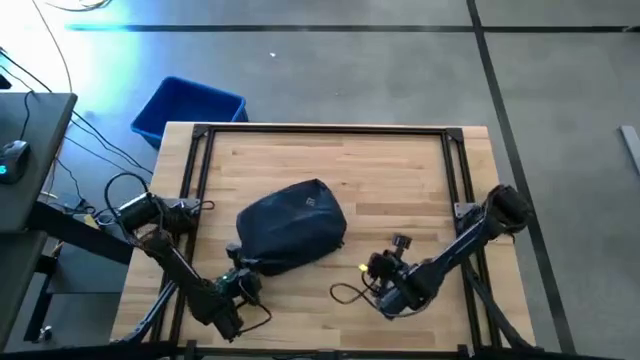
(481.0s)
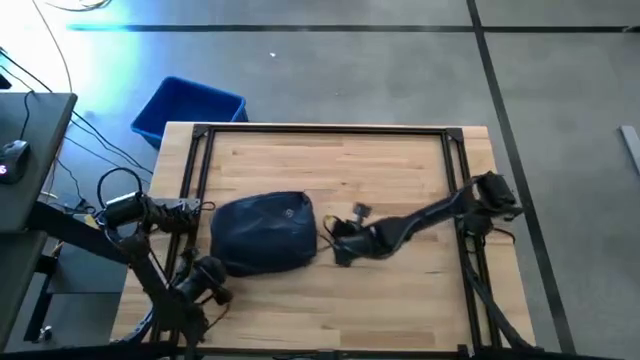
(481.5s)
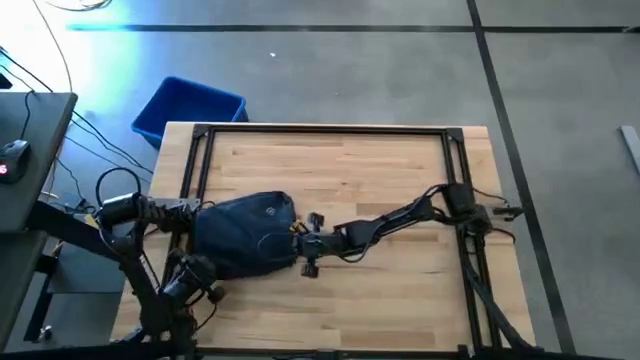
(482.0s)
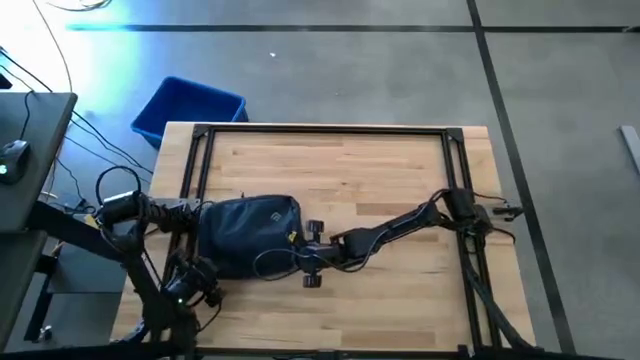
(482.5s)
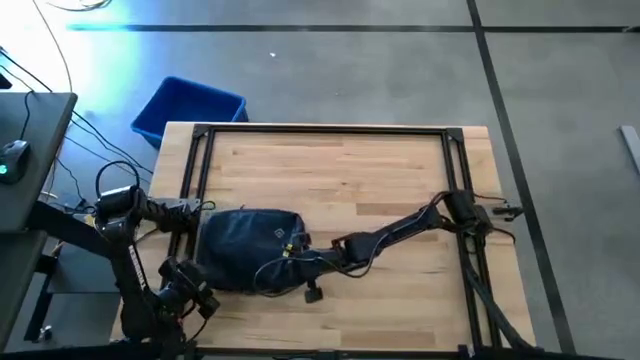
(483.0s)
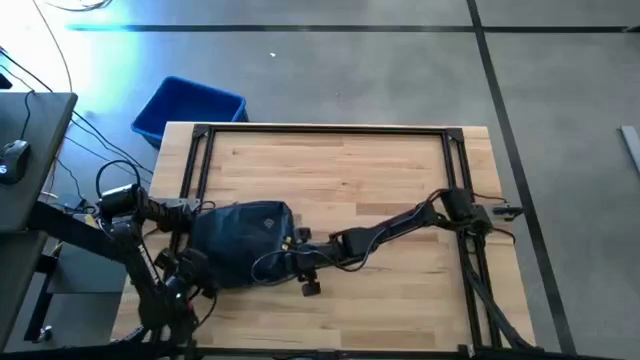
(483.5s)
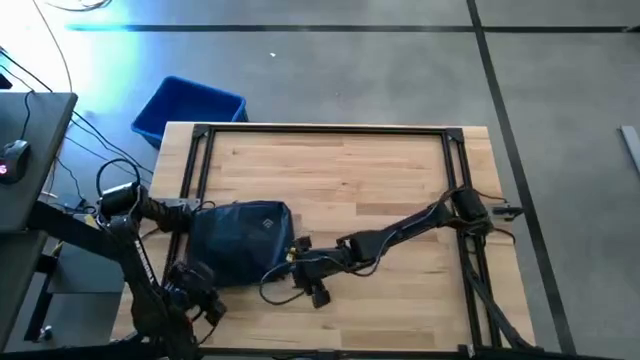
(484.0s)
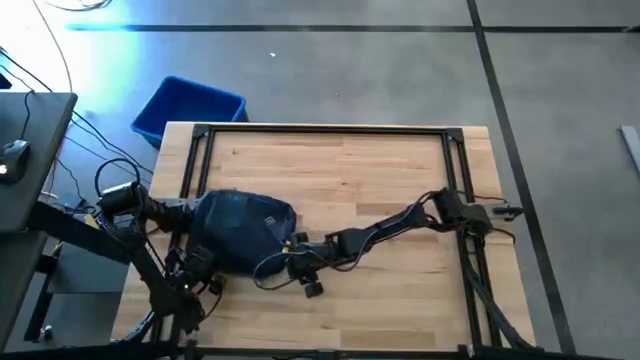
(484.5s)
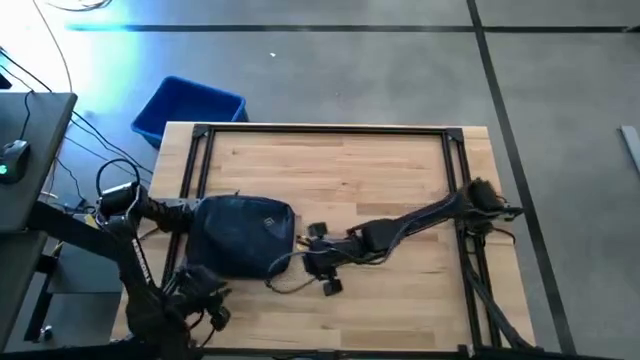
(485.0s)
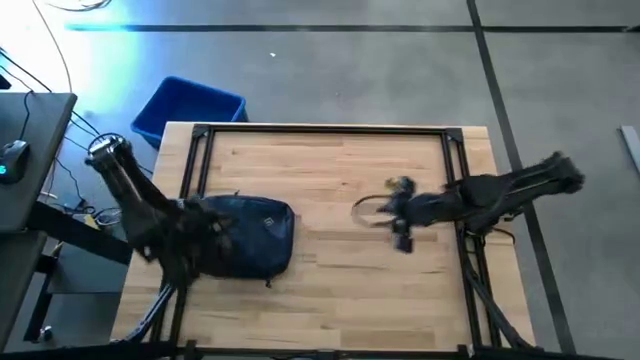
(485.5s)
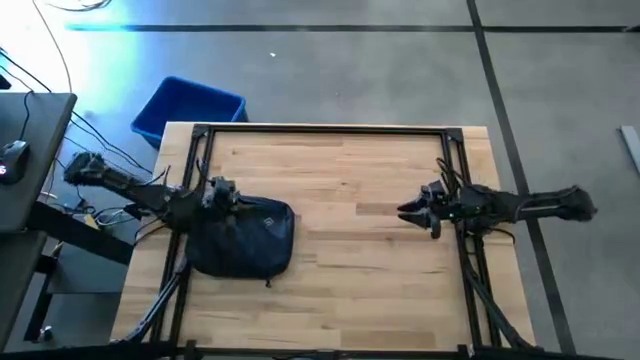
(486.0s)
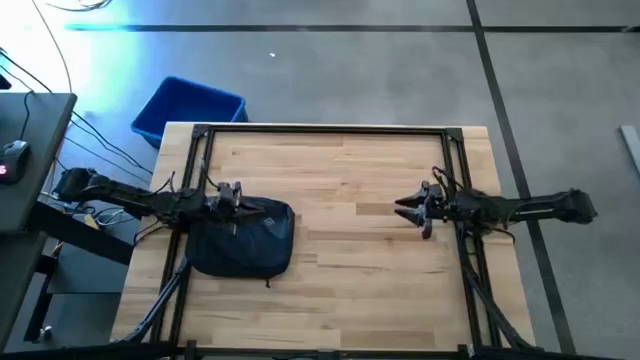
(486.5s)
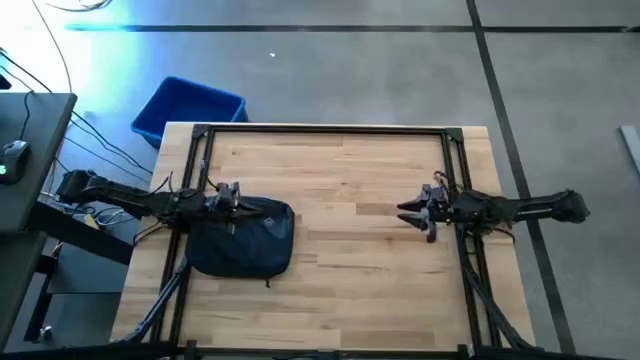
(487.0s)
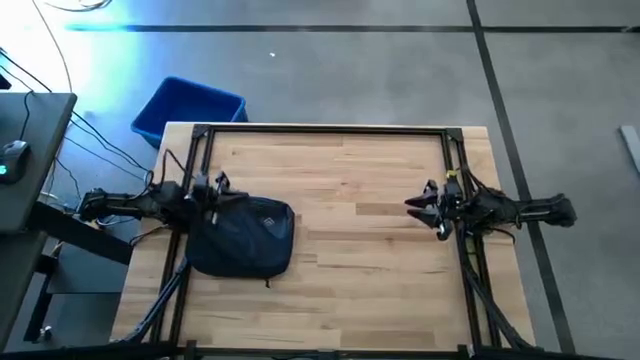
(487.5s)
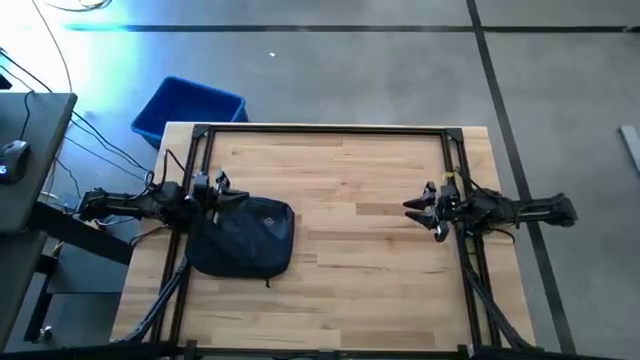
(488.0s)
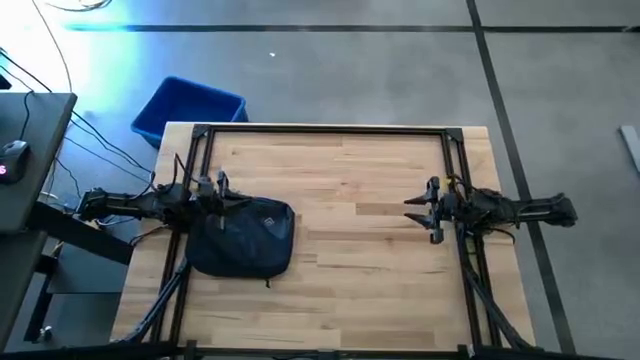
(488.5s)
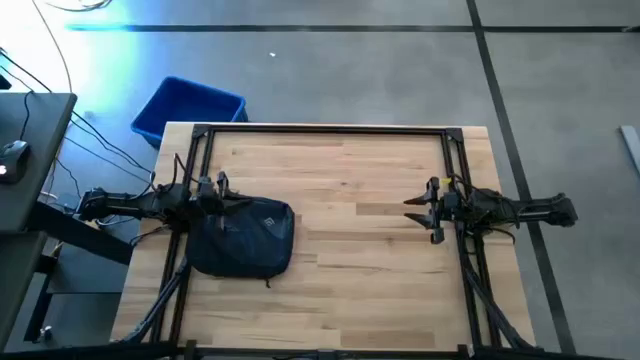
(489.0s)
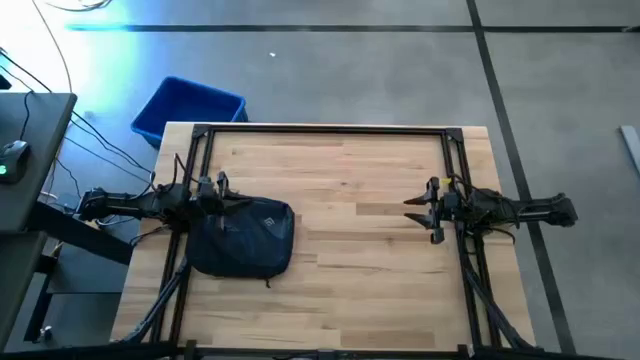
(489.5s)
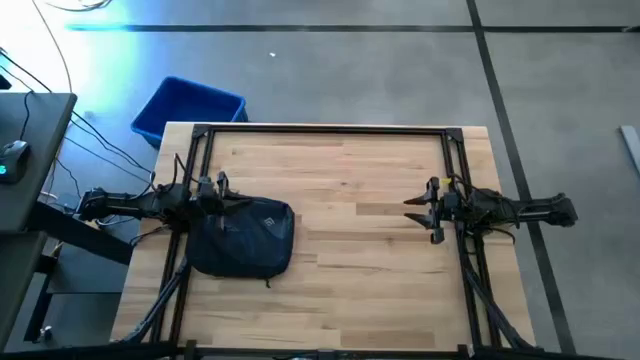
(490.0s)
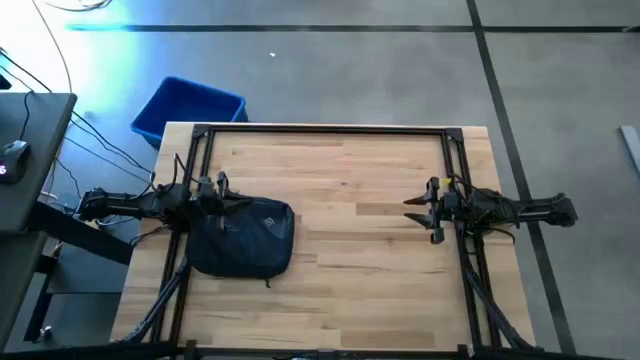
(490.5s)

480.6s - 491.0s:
Task: Unpack backpack
Return to home position

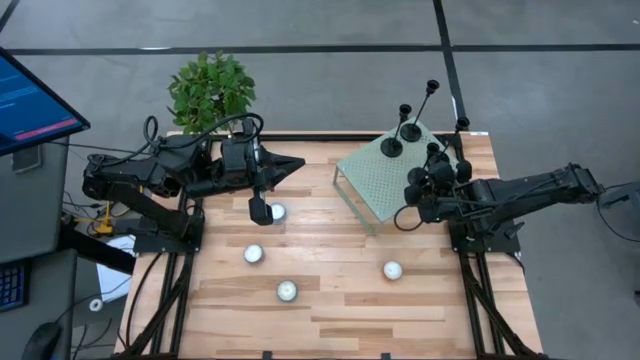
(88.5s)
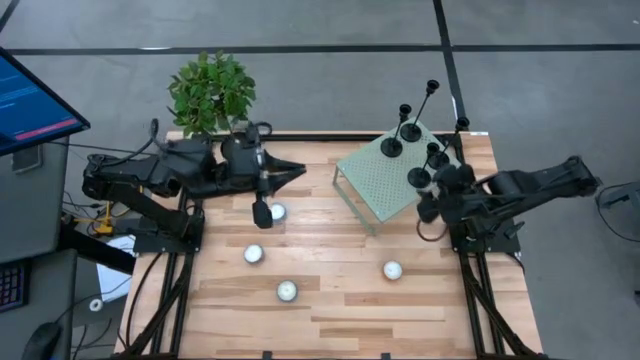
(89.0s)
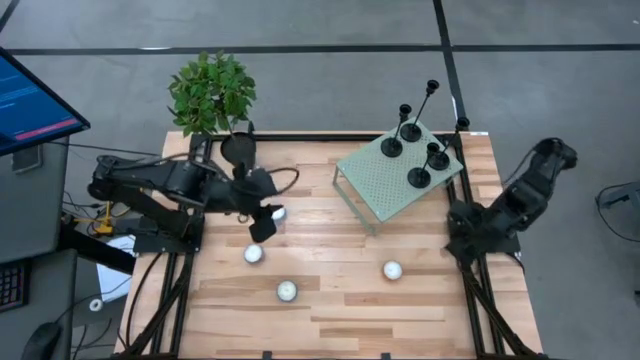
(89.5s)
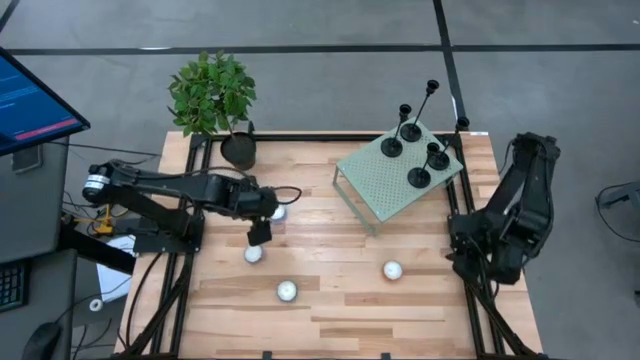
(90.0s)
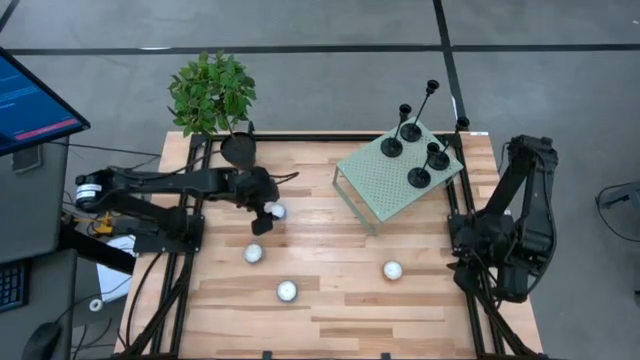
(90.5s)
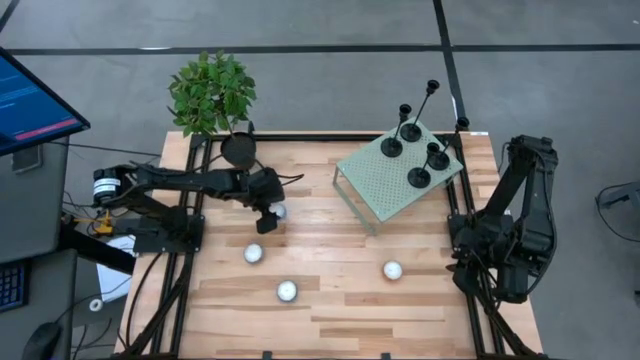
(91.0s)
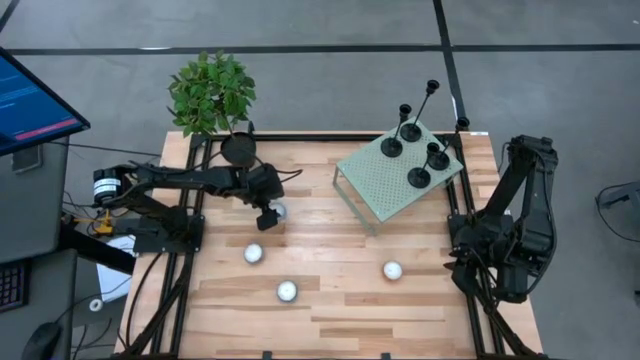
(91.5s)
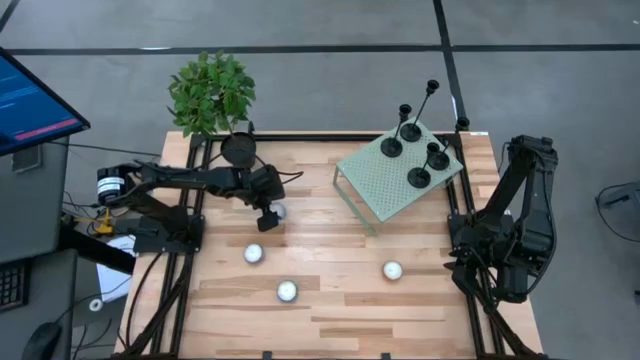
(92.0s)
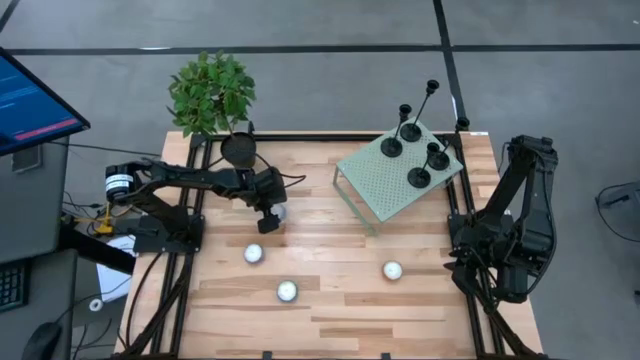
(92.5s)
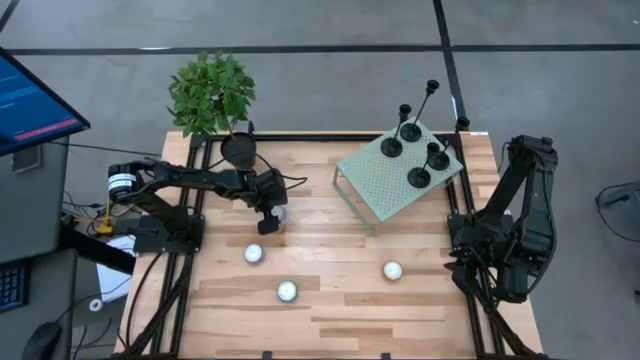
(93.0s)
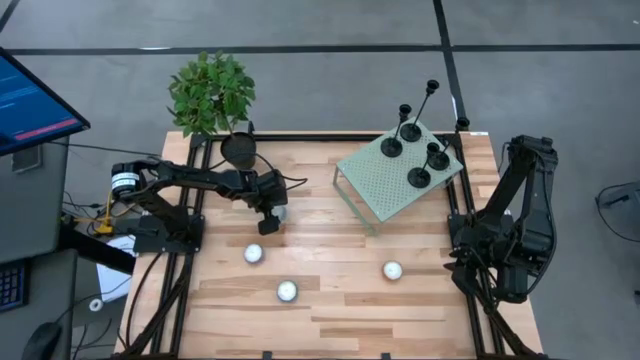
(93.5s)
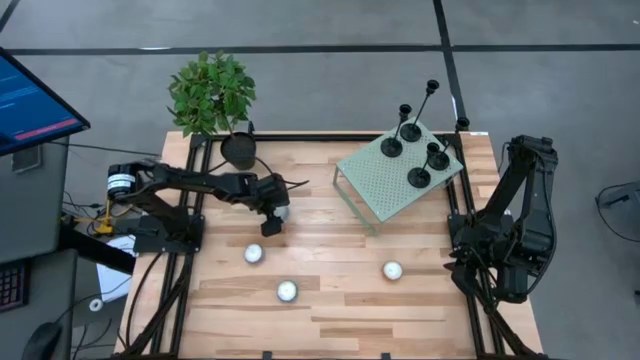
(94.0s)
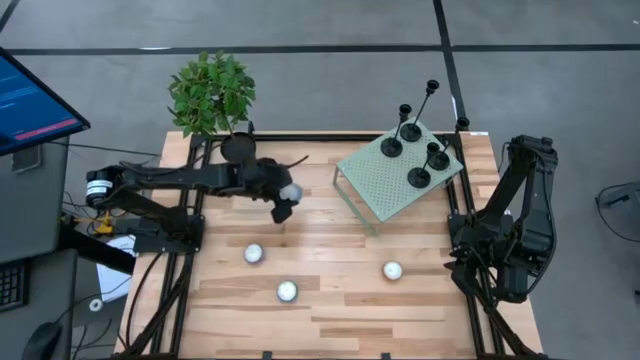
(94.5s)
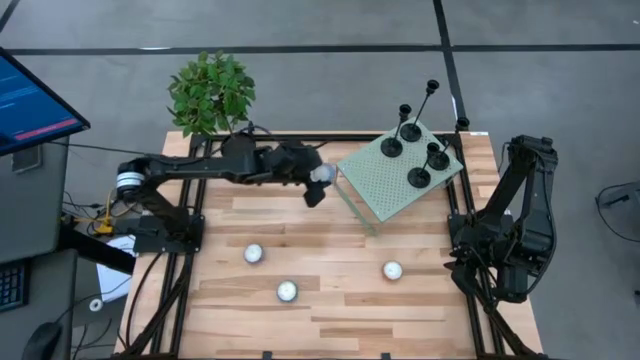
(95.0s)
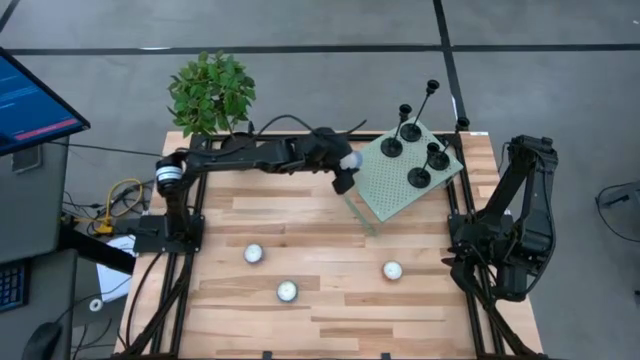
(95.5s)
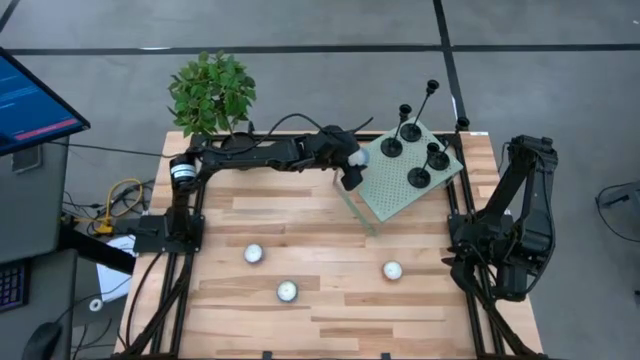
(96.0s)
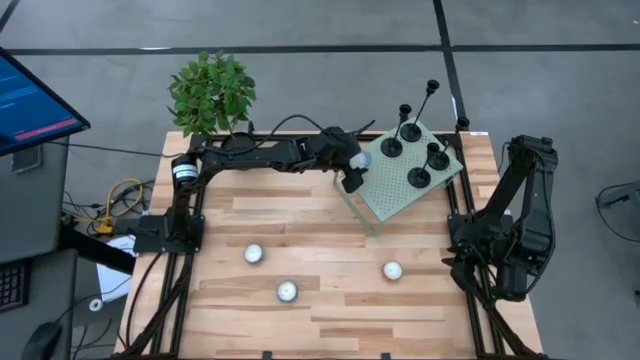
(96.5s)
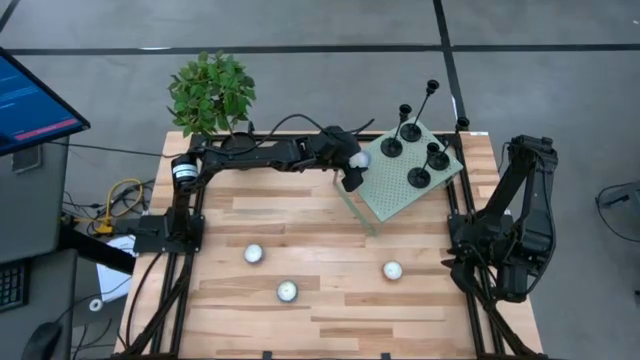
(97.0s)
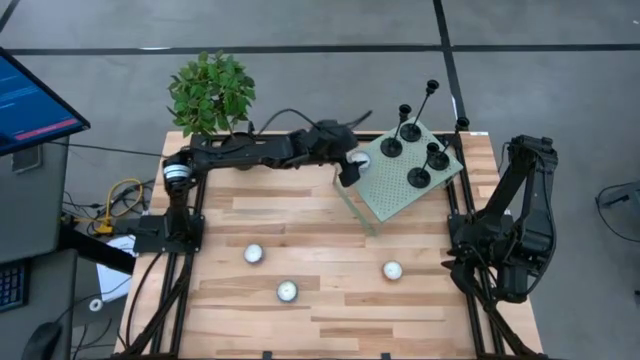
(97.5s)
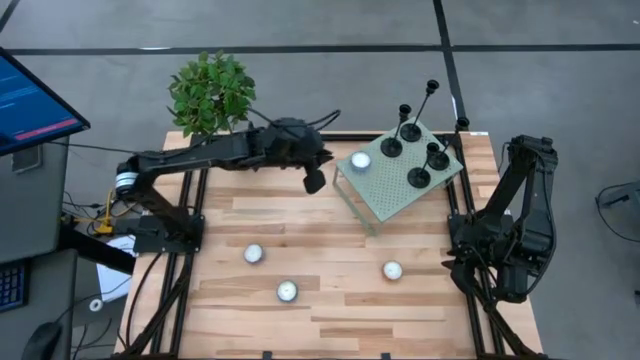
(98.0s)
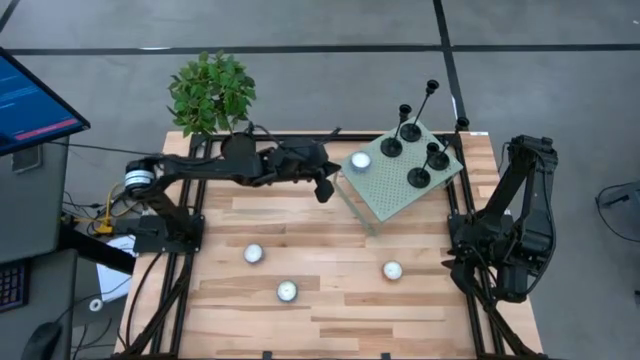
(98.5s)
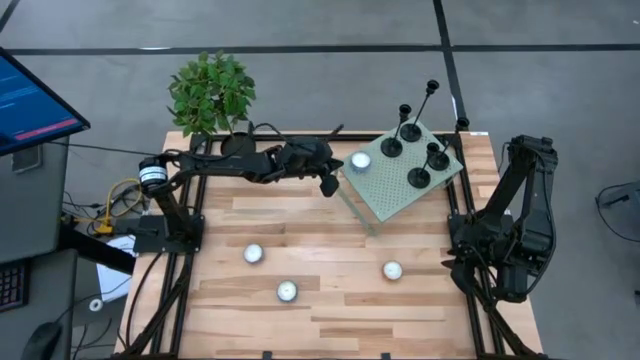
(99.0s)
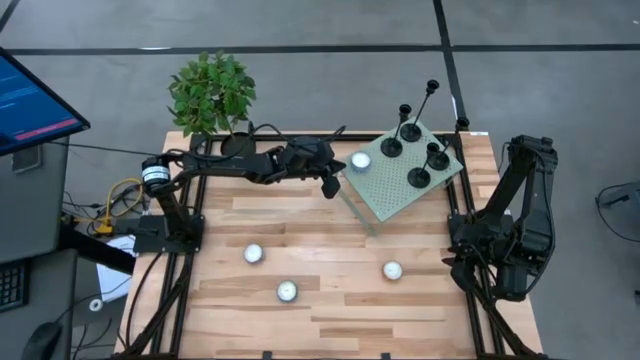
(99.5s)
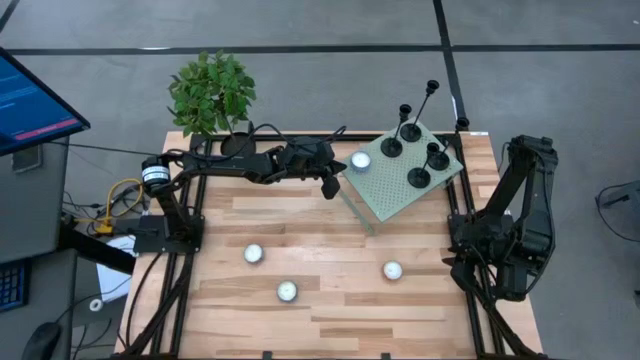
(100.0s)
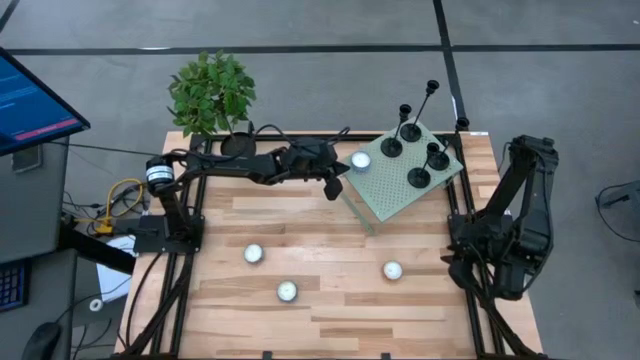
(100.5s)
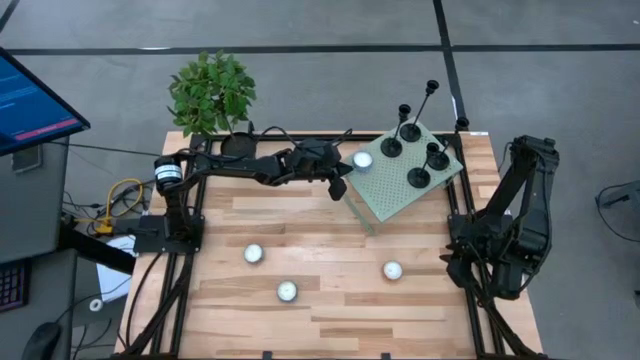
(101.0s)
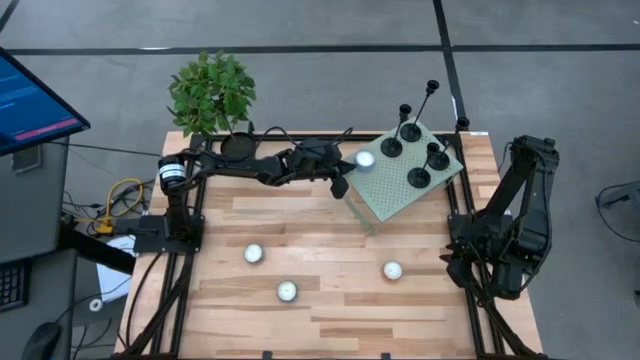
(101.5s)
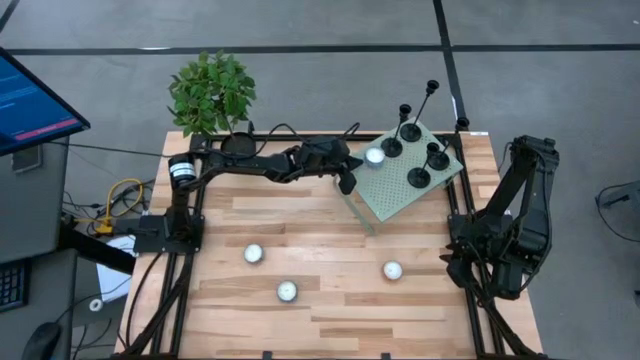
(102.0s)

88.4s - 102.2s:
Task: Pick & Place candle stick holders
Put the light blue scented candle on the shelf
